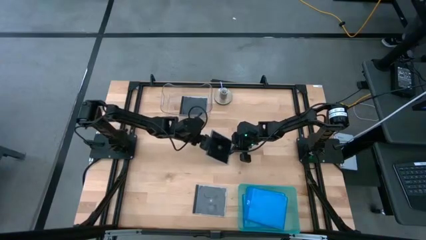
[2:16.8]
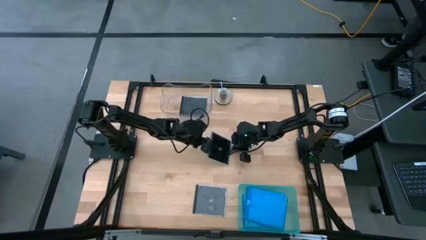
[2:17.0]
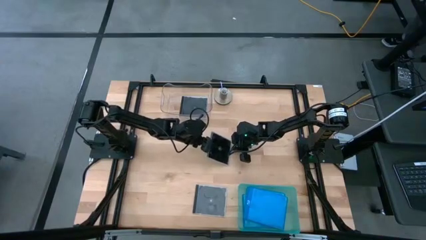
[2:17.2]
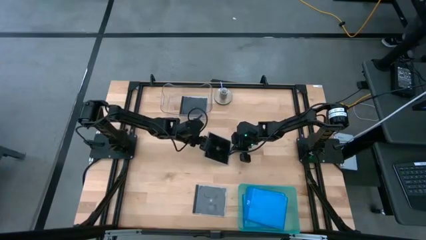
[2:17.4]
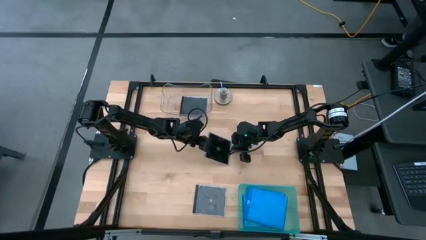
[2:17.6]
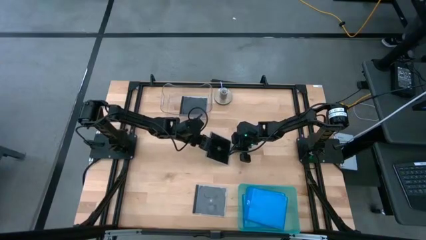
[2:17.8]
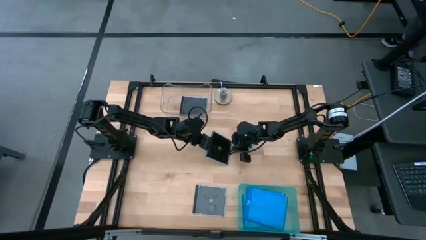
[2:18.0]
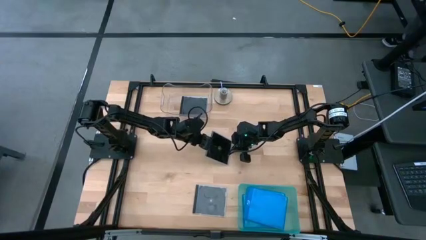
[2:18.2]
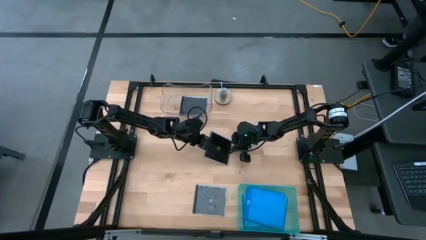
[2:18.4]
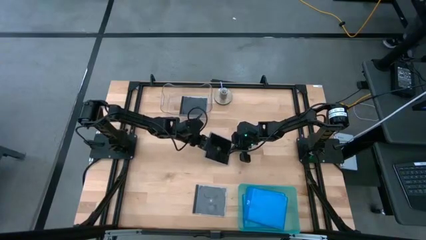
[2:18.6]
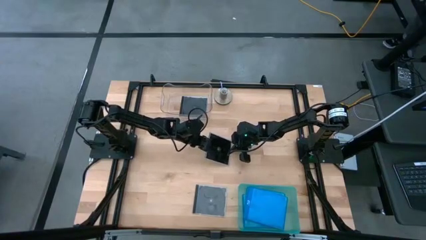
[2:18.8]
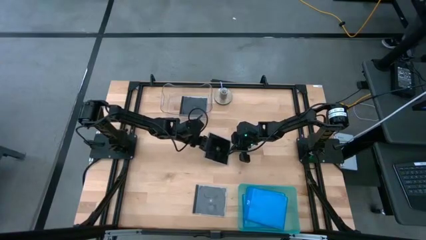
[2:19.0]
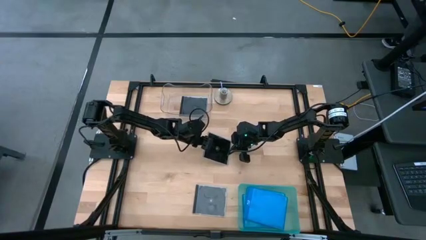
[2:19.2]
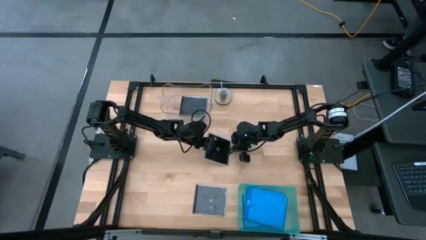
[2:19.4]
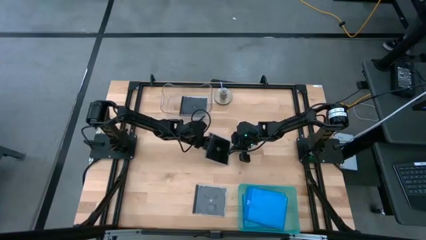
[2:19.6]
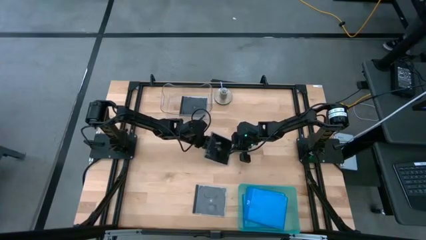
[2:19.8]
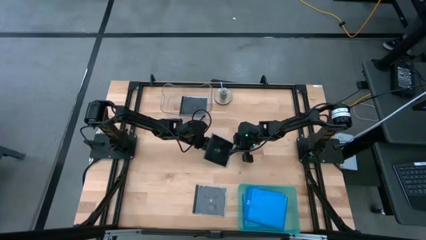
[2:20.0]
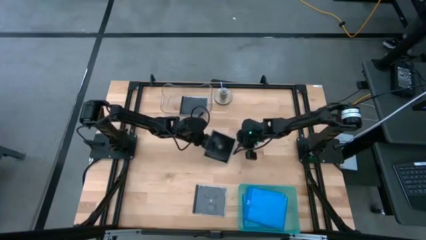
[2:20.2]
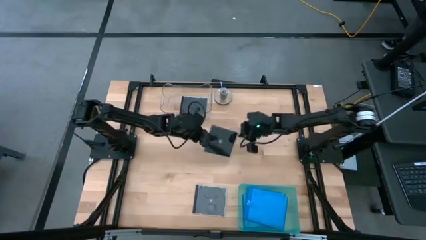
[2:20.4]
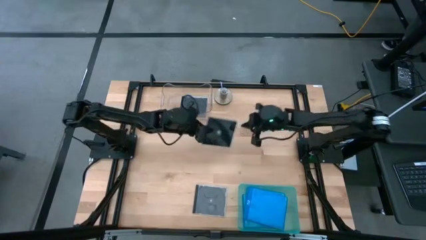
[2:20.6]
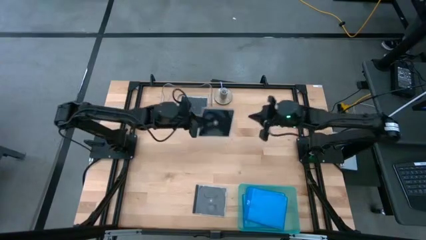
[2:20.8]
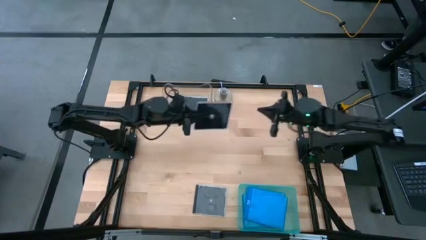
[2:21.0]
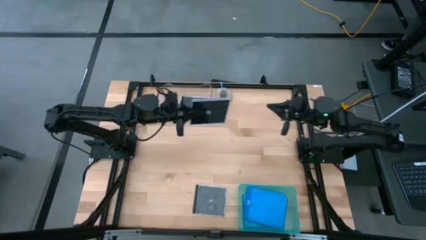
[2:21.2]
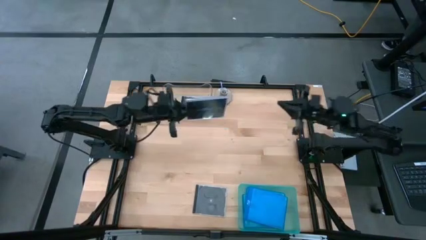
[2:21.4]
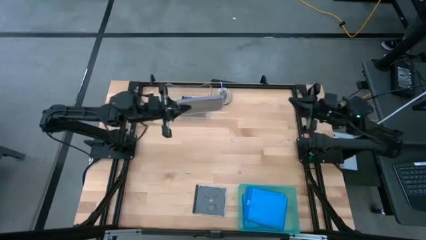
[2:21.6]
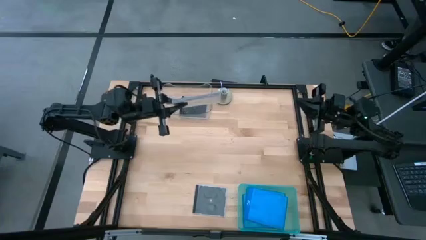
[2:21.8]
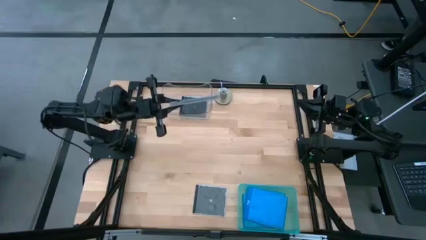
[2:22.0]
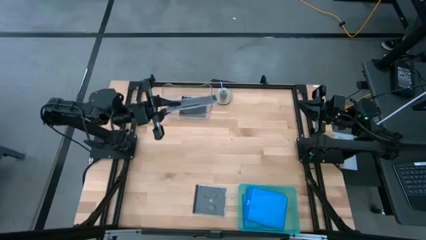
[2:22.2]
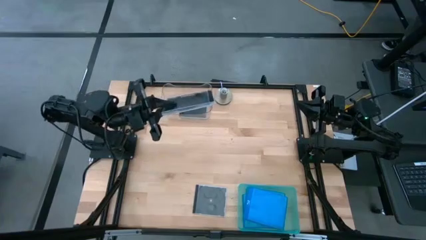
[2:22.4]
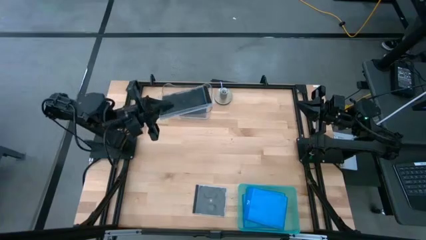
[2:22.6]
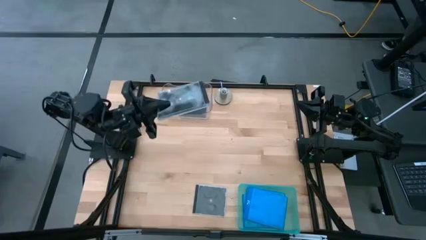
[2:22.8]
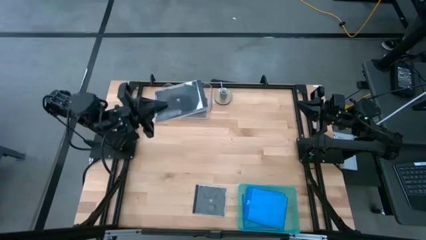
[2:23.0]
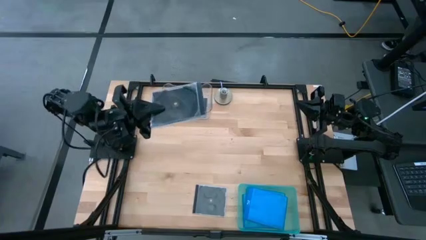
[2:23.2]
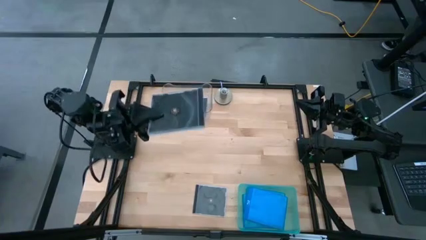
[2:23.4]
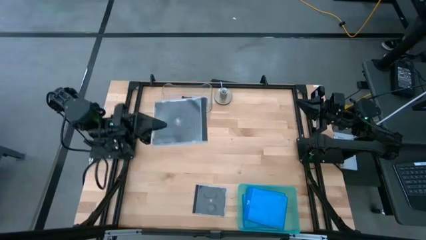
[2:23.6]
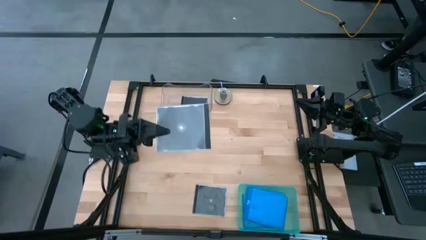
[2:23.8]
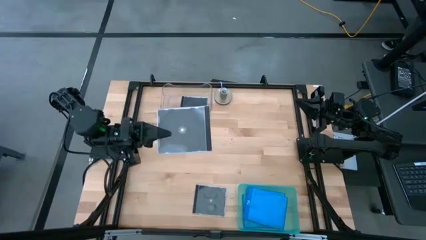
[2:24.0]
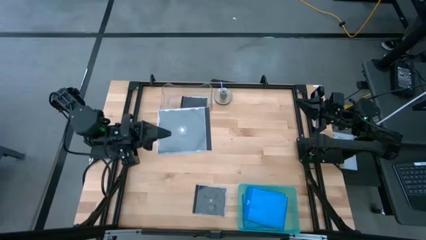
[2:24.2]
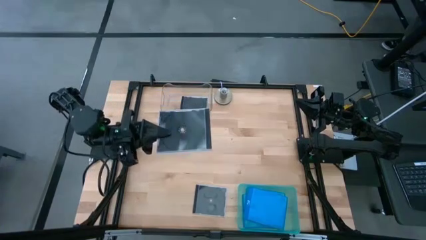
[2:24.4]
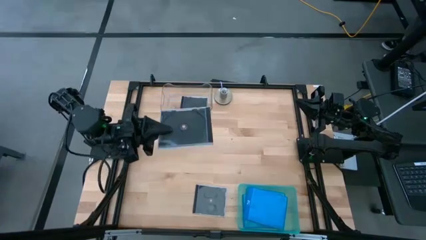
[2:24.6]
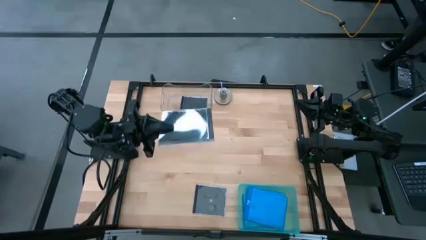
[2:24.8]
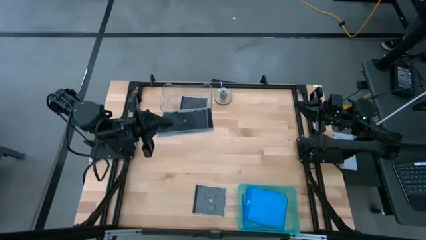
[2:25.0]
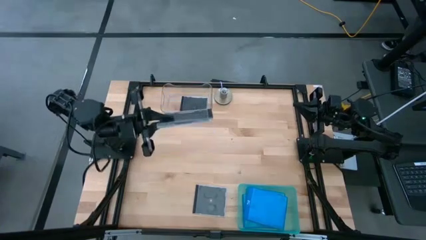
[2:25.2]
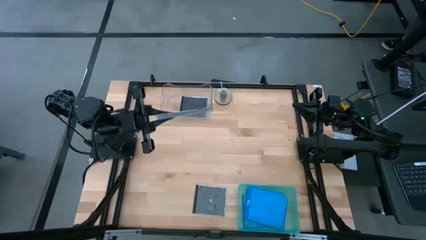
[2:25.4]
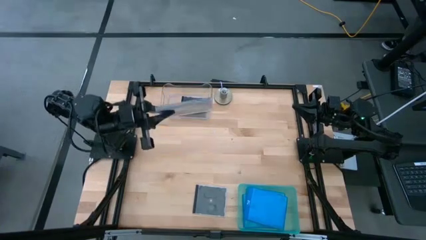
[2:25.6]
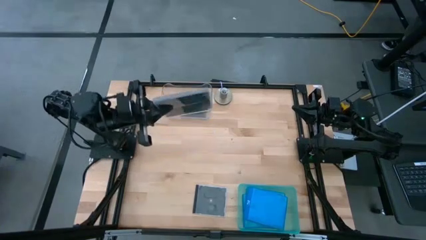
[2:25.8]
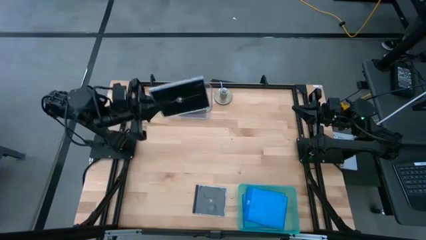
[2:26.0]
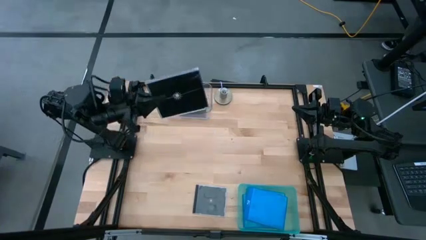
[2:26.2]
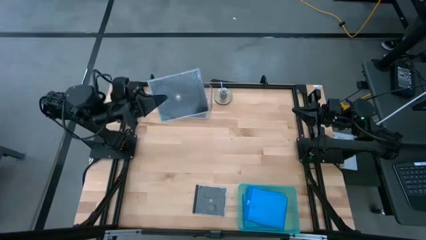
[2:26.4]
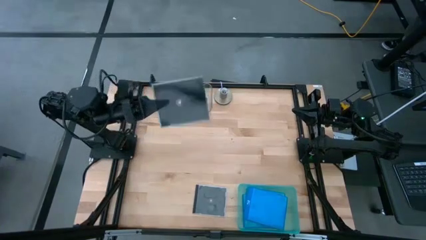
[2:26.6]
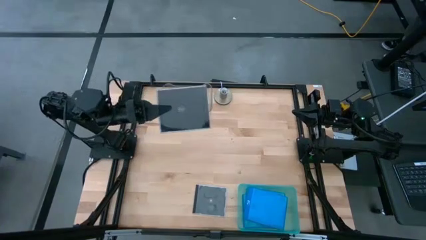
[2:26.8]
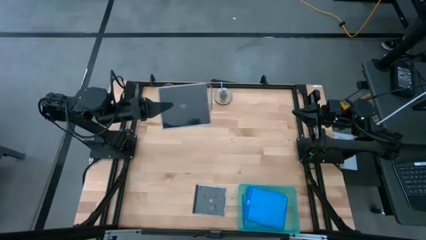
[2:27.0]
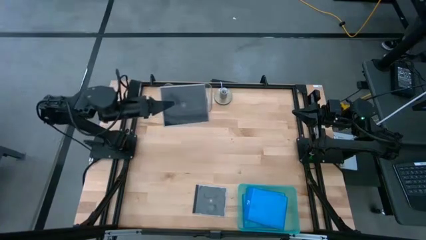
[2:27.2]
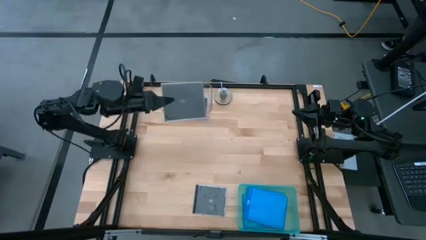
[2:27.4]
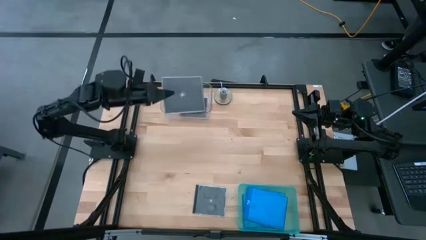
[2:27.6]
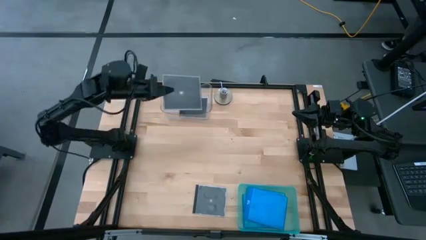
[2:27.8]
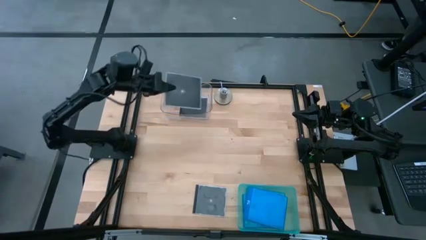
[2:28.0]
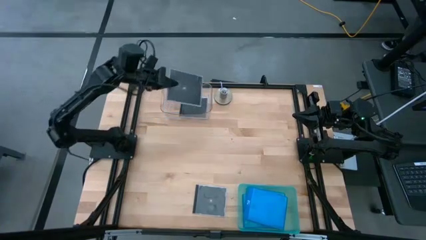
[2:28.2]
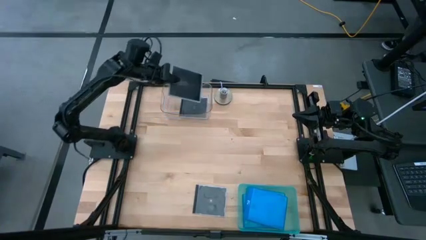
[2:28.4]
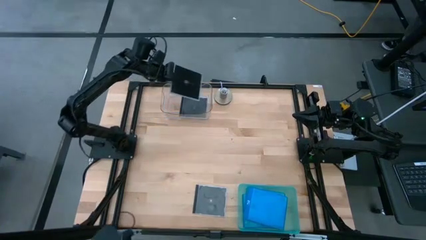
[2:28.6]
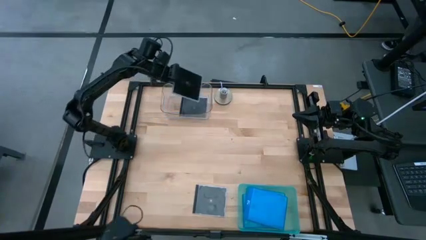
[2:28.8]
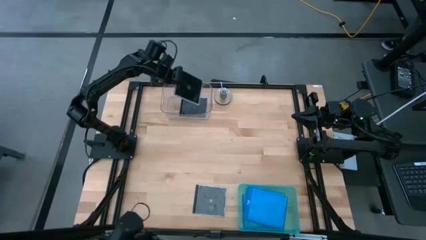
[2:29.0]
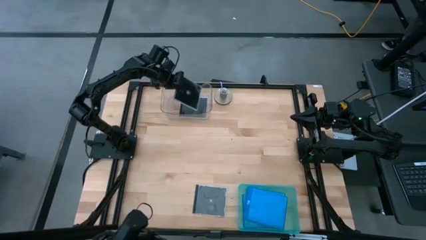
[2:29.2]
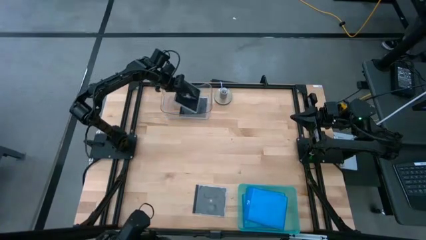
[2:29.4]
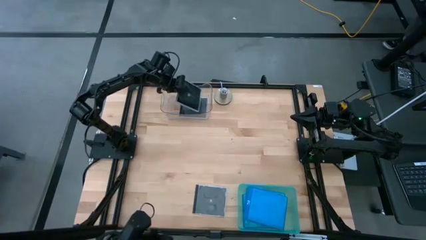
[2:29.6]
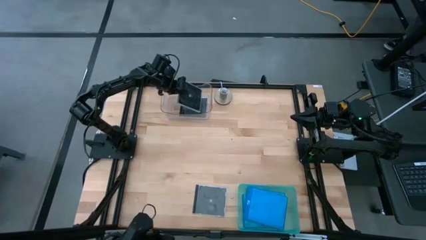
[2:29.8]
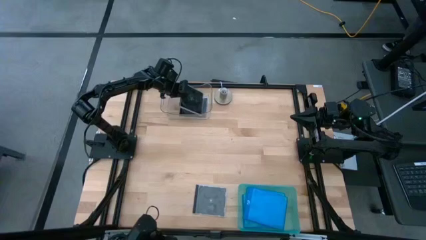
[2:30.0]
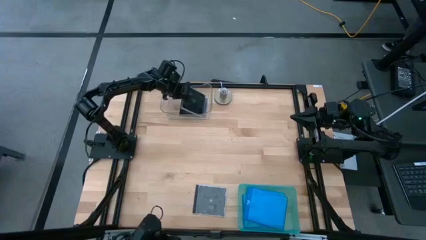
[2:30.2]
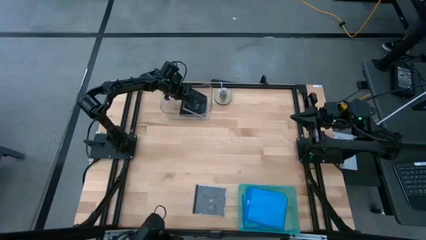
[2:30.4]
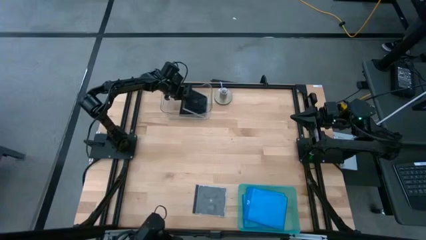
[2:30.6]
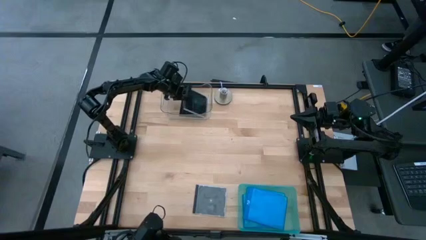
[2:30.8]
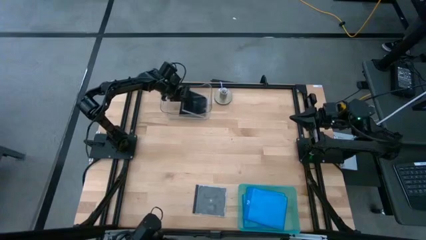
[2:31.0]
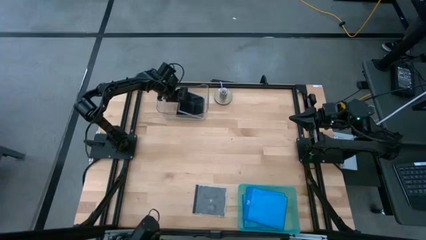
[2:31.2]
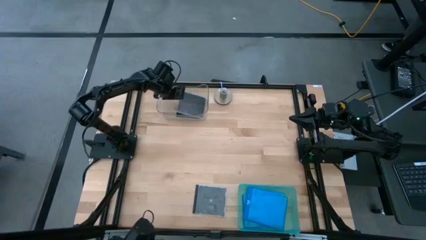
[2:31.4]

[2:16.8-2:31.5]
Task: Pick & place jewel cases by type
Put the left black cd case into the transparent bin

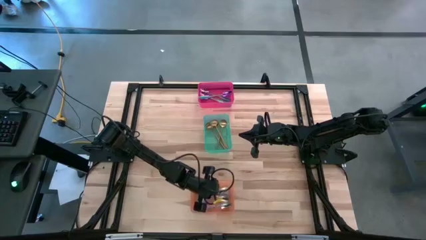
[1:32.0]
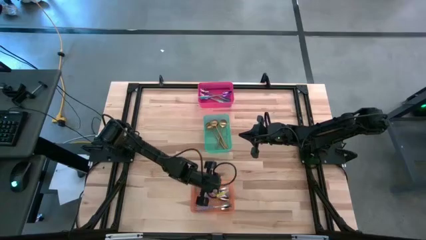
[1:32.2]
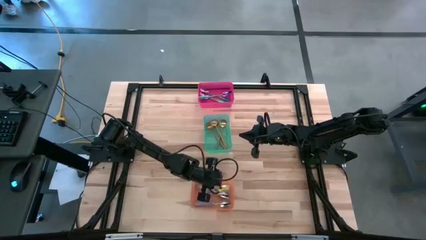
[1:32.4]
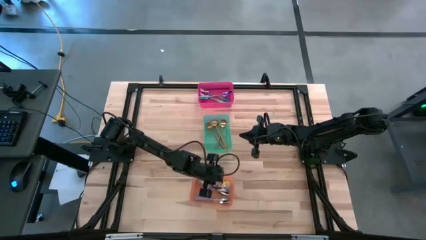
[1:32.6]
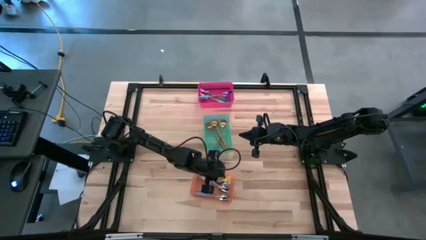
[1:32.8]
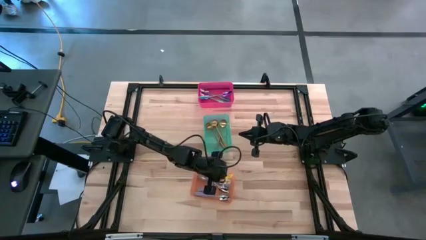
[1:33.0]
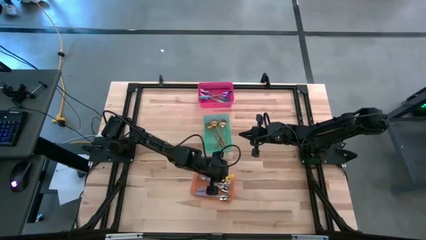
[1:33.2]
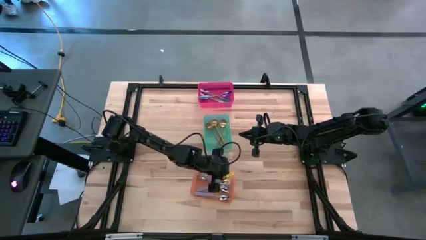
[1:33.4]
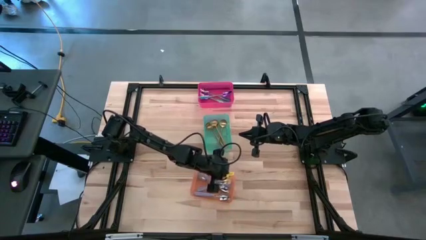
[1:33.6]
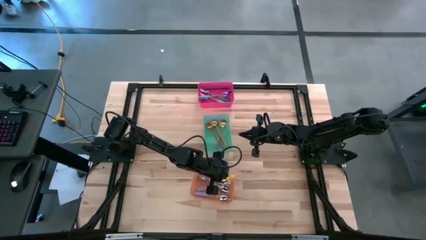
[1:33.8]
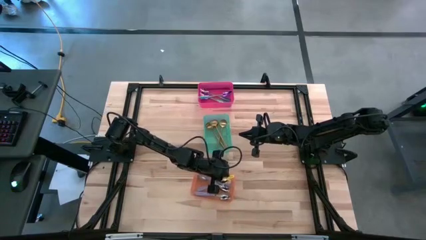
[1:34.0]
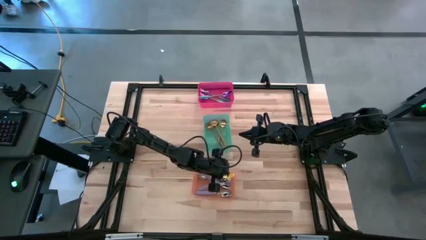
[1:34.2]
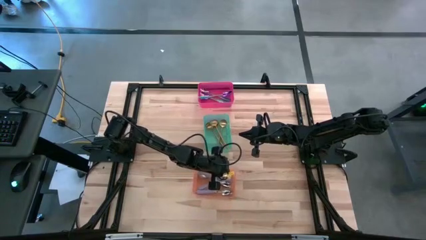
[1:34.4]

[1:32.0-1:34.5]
Task: Sort silverware by color (type)
Adjust the orange bin on the table
